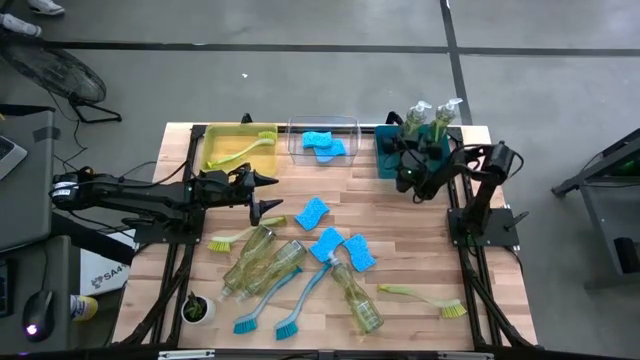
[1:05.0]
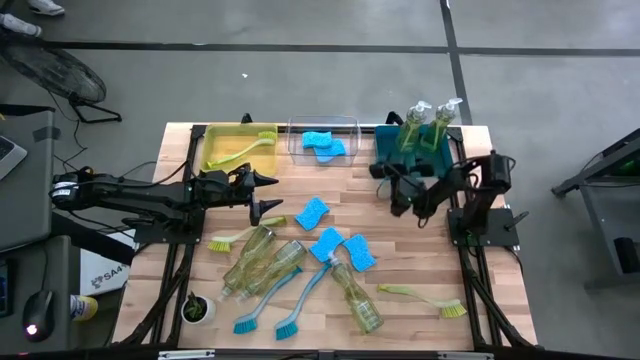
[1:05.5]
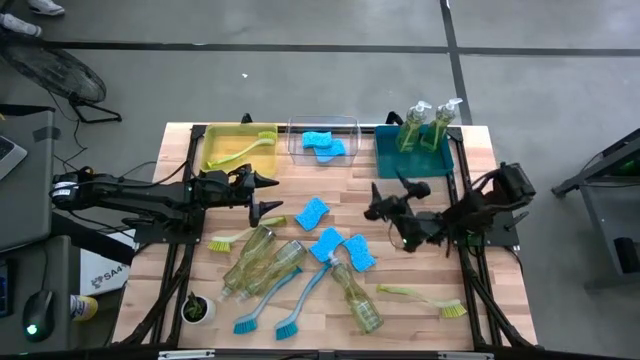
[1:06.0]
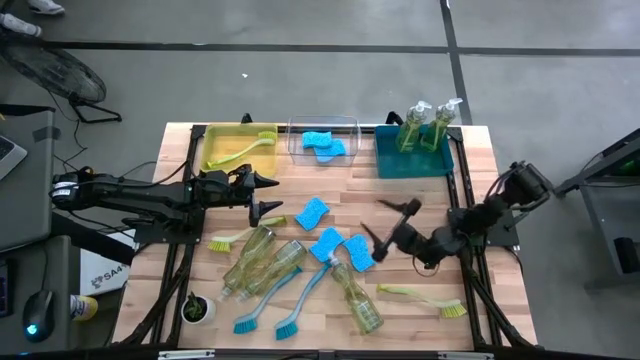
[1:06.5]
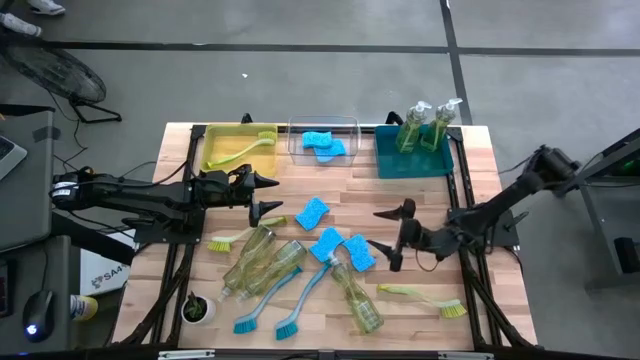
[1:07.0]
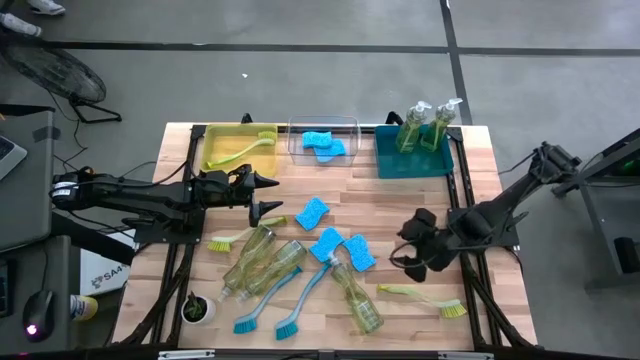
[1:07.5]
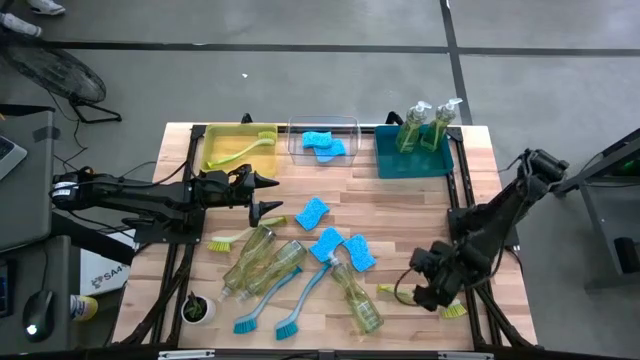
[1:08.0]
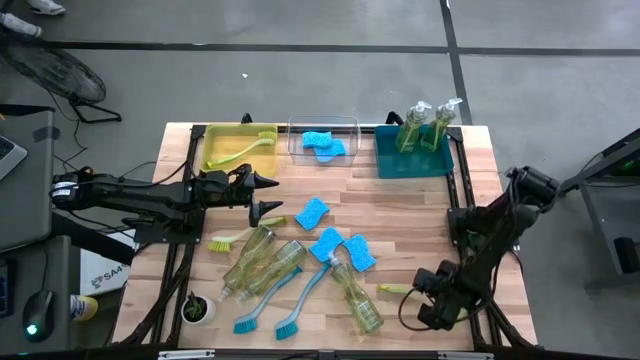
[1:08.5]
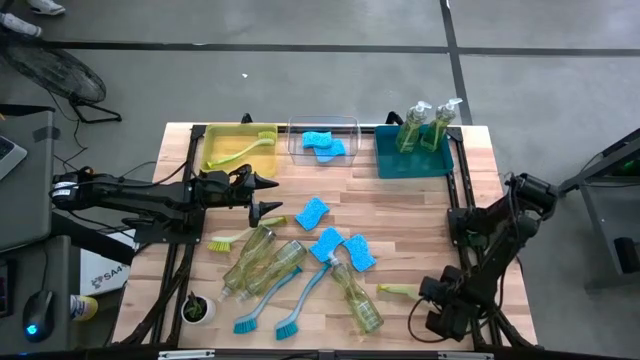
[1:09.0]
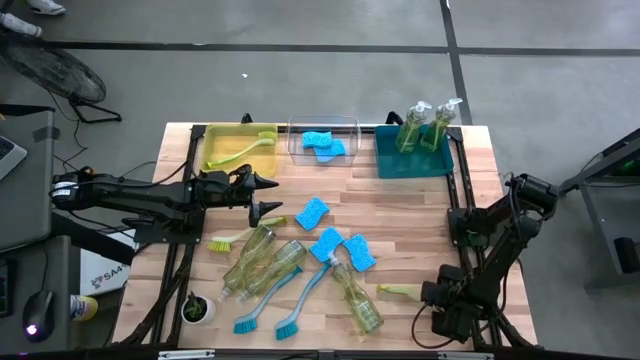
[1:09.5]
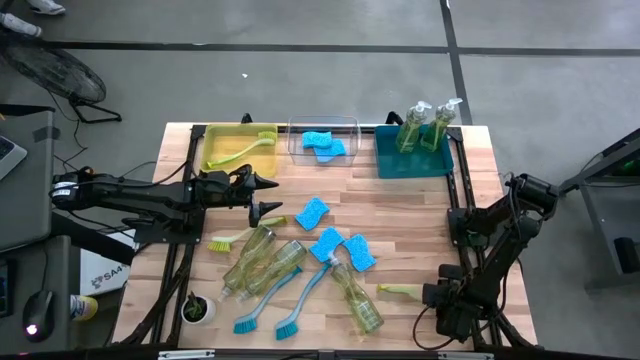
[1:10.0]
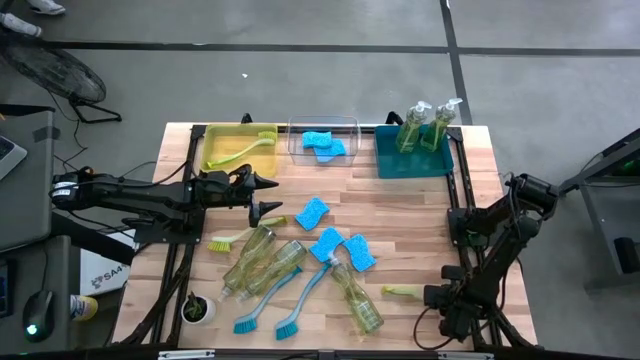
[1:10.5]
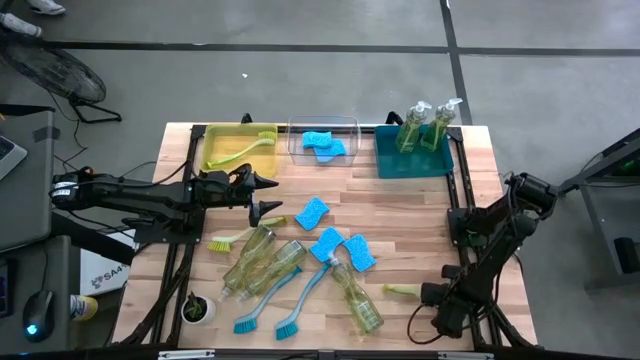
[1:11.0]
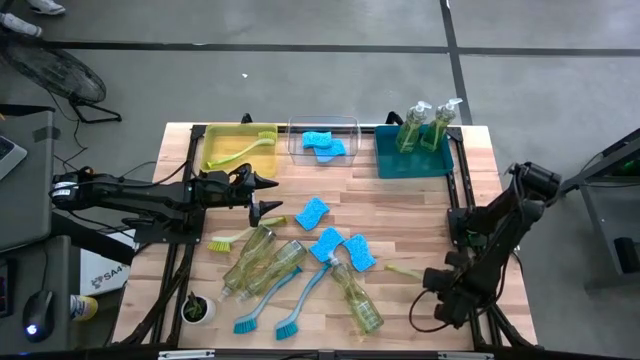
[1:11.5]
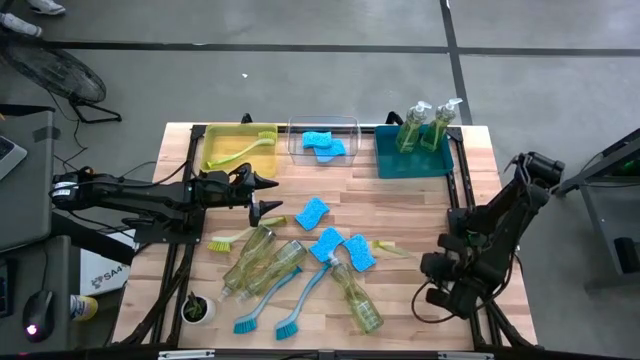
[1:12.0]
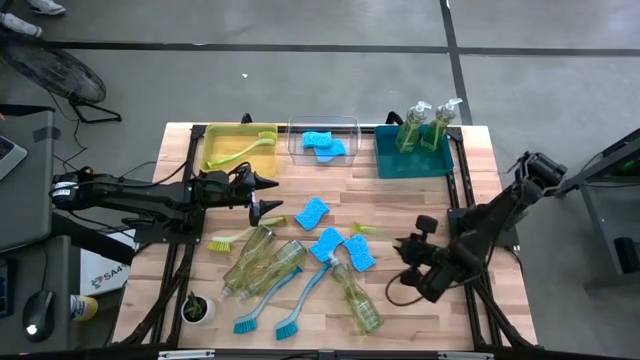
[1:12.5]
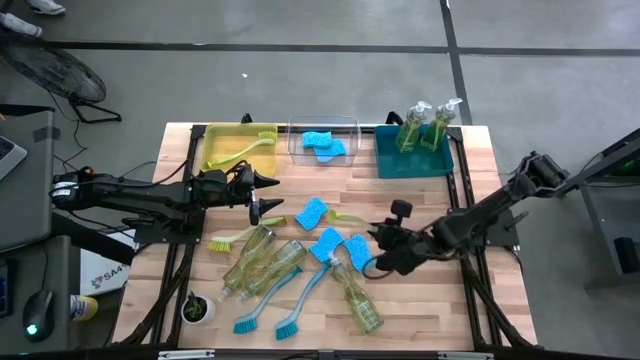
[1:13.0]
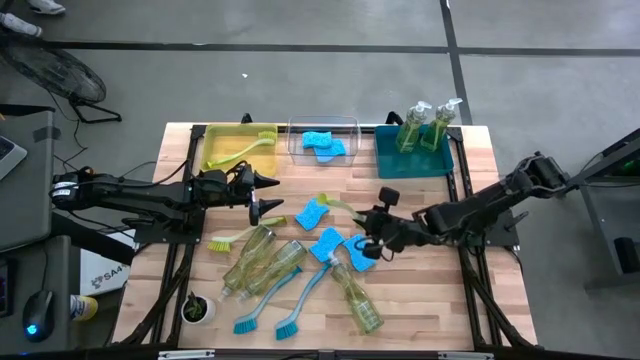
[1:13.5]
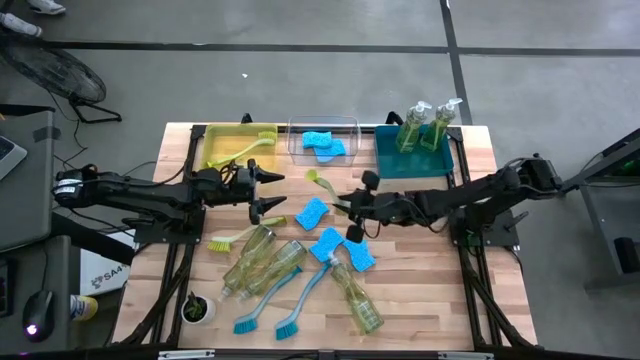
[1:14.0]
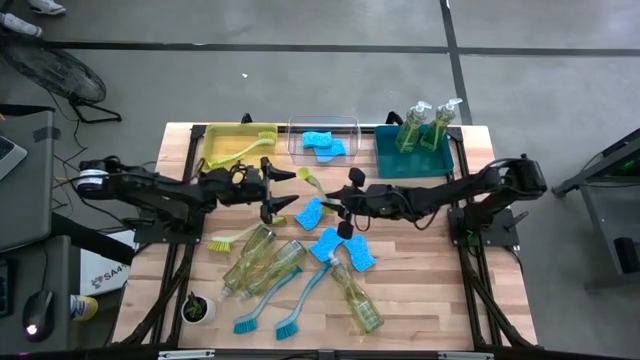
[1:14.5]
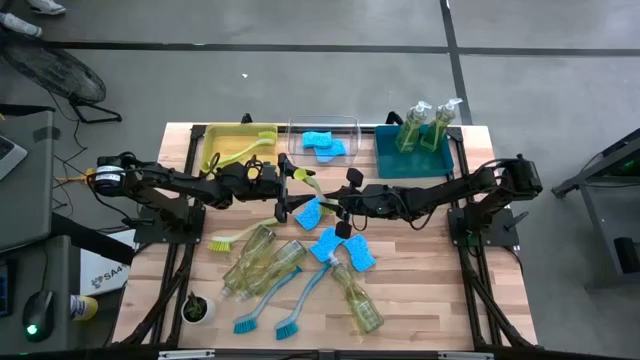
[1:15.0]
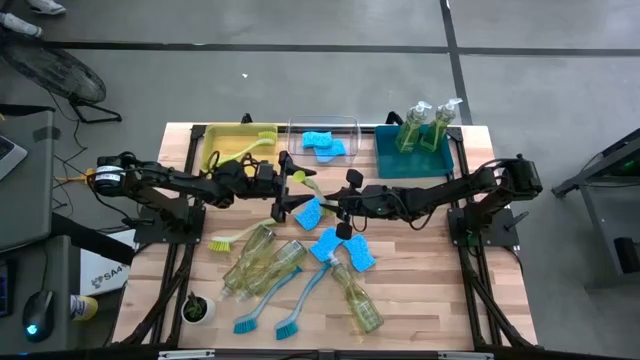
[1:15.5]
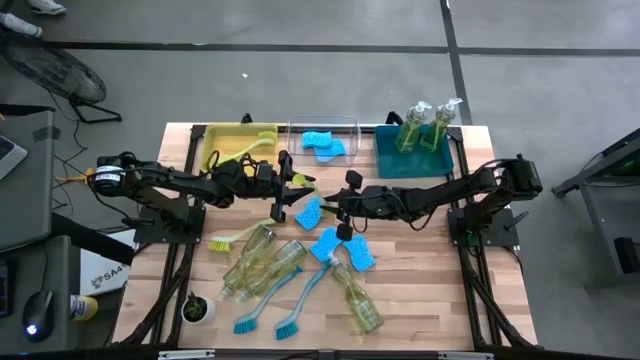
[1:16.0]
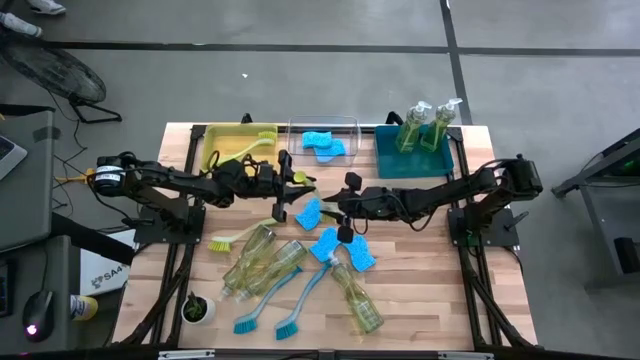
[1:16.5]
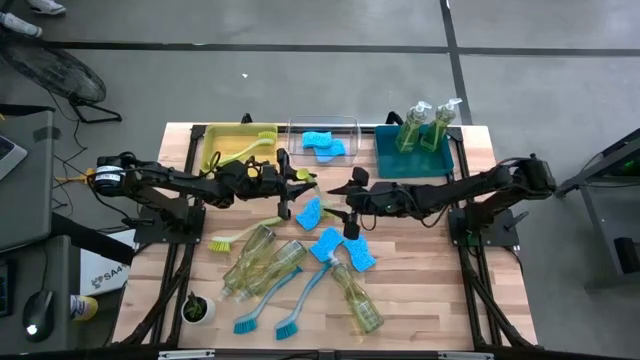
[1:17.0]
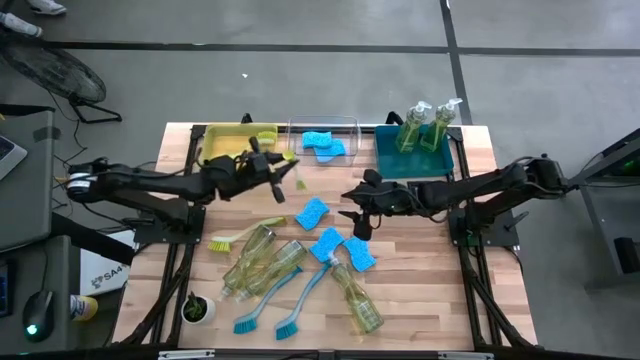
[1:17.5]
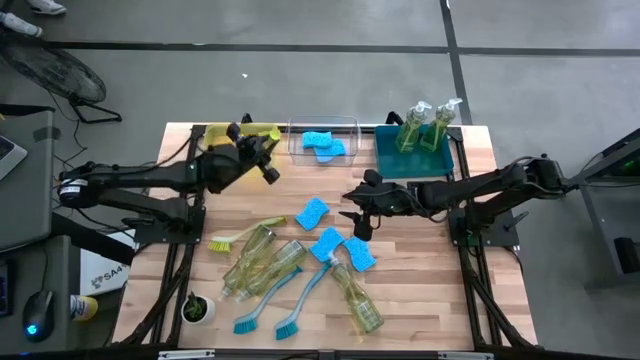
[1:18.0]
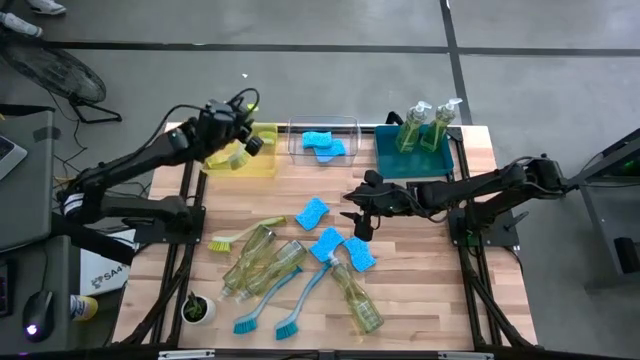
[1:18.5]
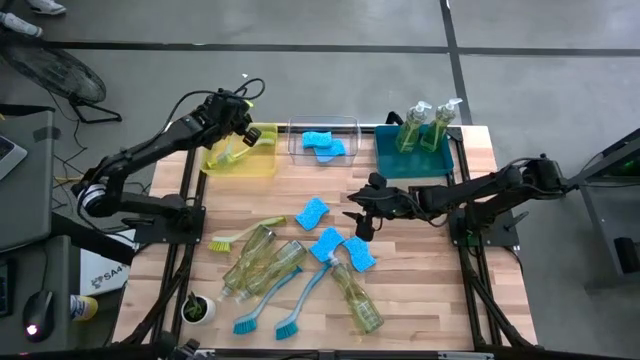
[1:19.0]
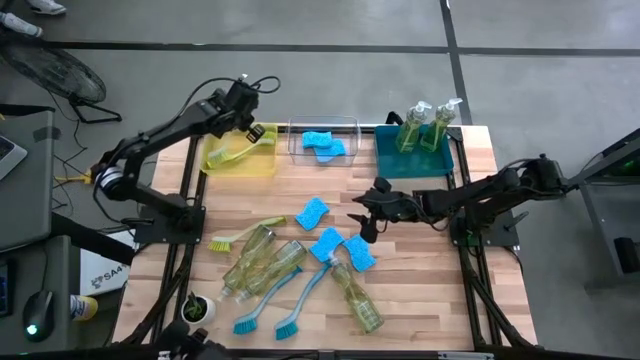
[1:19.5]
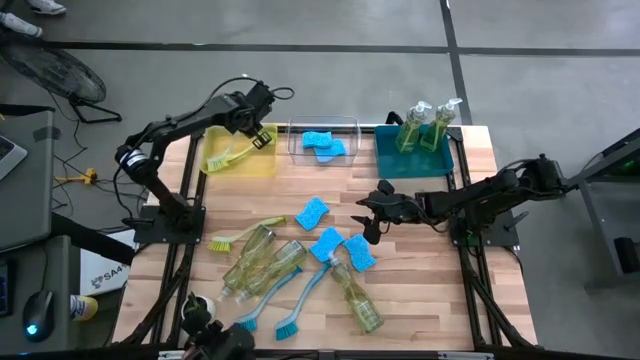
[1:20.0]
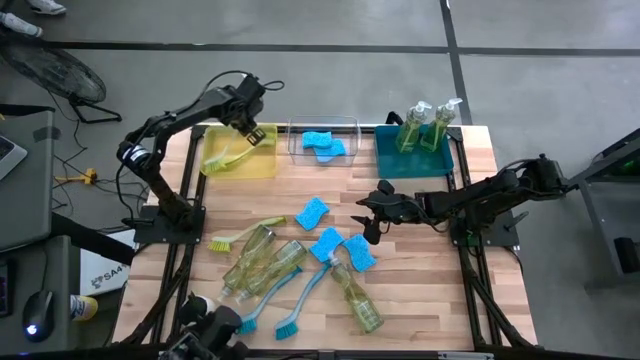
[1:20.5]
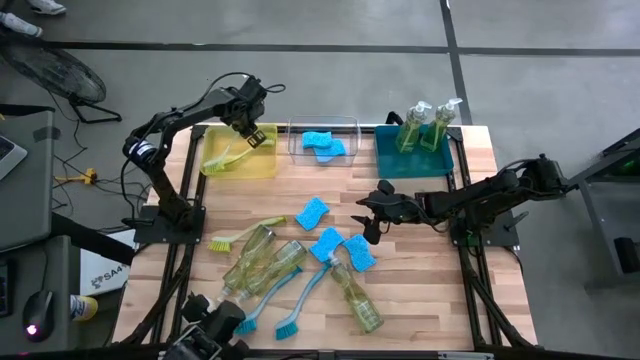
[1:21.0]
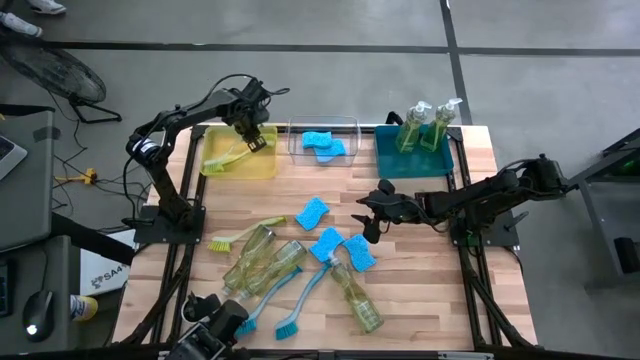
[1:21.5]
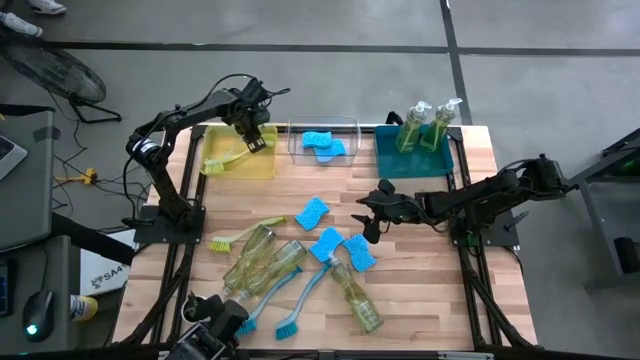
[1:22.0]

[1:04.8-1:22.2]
Task: Pick & Place Kitchen Sink Supplies
Put the right yellow dish brush into the yellow bin

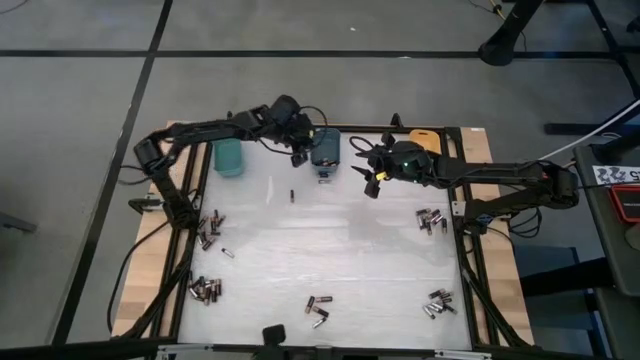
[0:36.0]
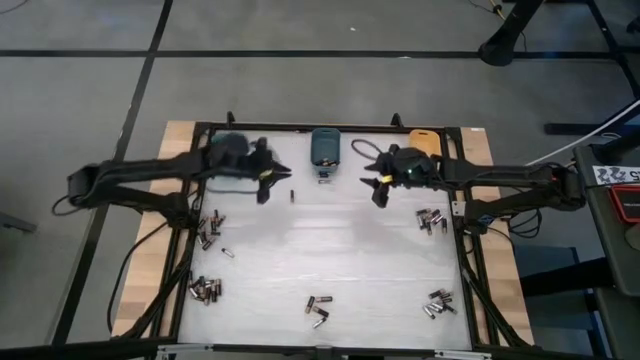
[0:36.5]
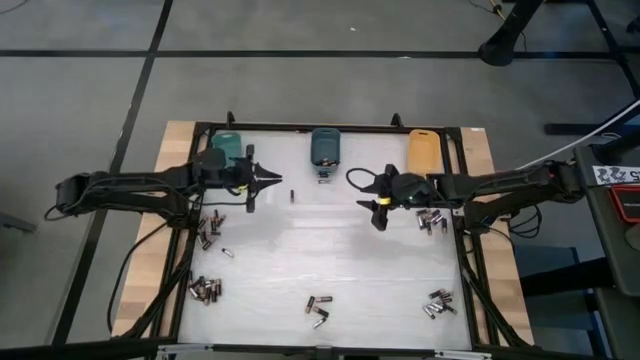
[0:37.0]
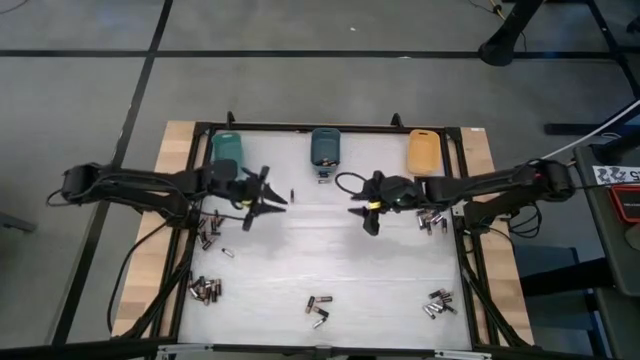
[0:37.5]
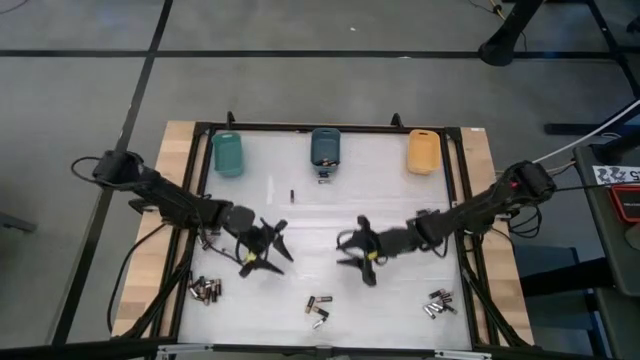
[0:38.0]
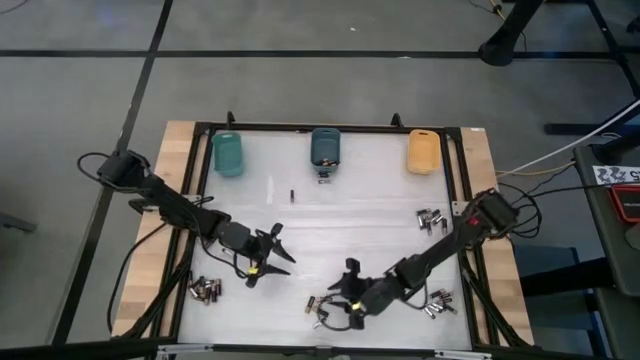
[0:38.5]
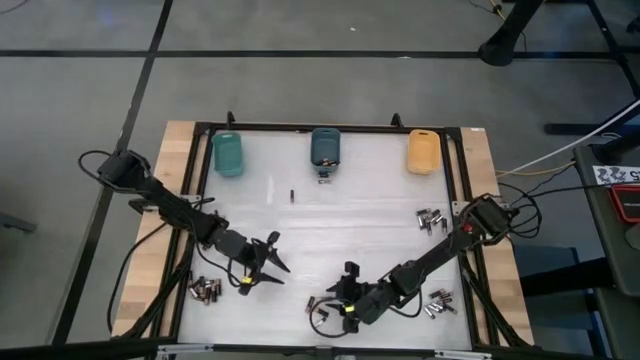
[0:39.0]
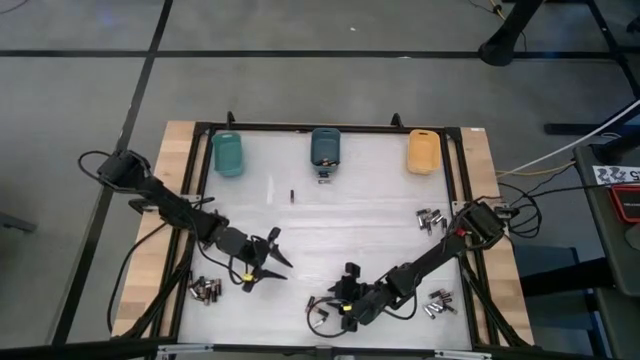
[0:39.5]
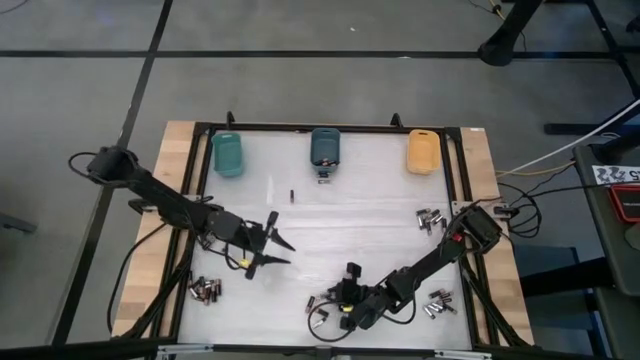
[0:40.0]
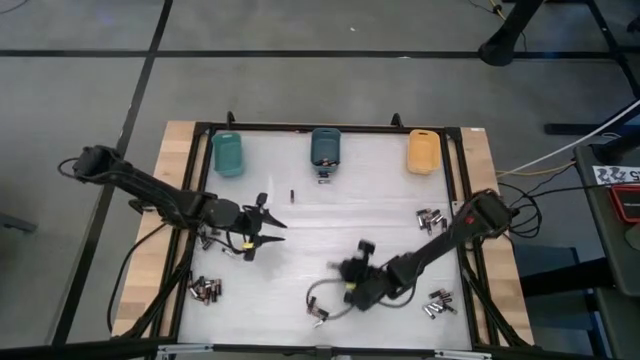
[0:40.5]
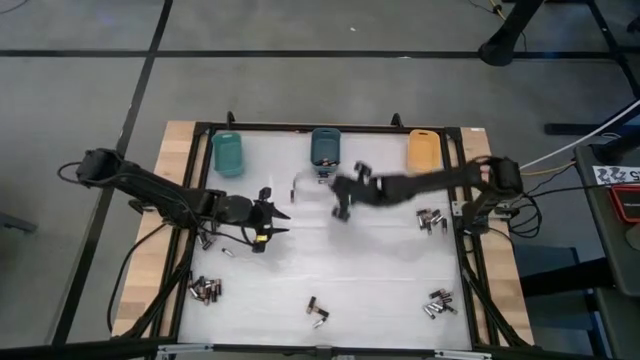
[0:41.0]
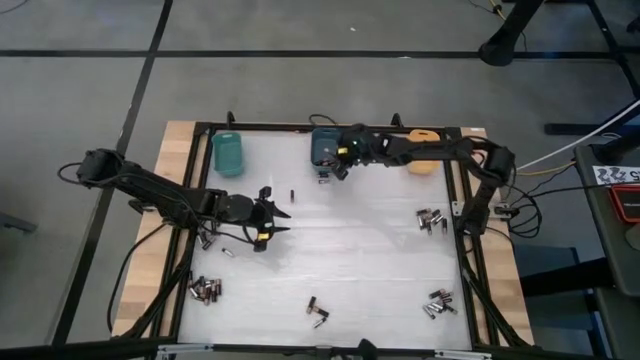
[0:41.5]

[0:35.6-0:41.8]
Task: Sort batteries
Put the brown battery into the blue bin
